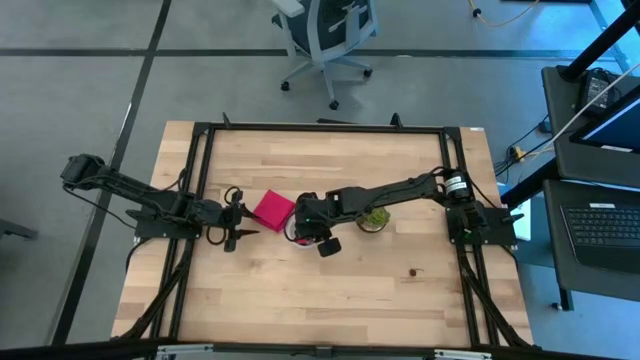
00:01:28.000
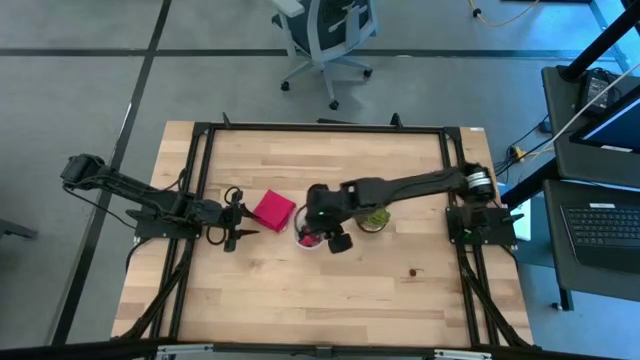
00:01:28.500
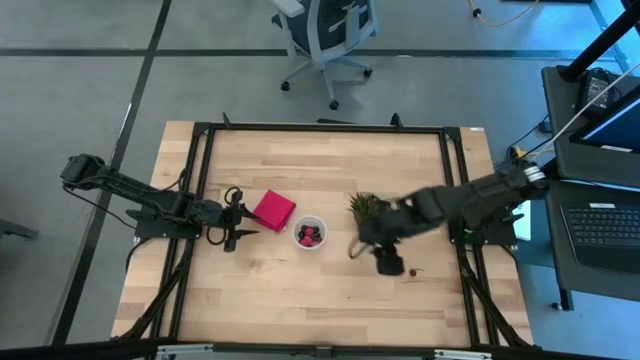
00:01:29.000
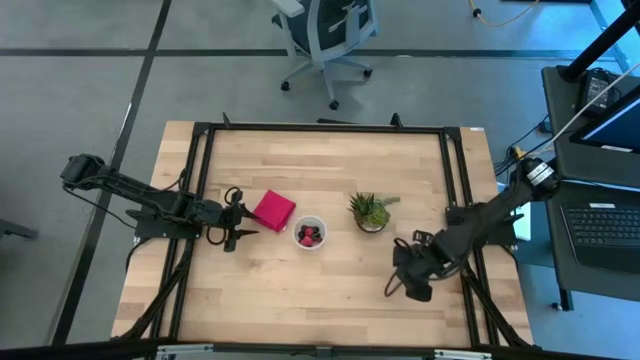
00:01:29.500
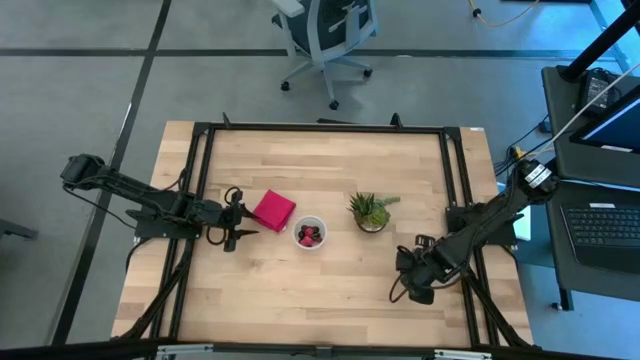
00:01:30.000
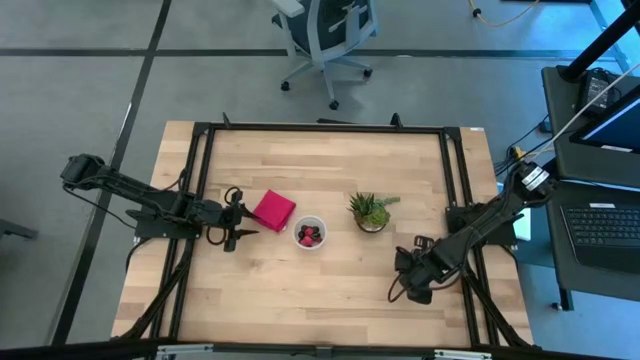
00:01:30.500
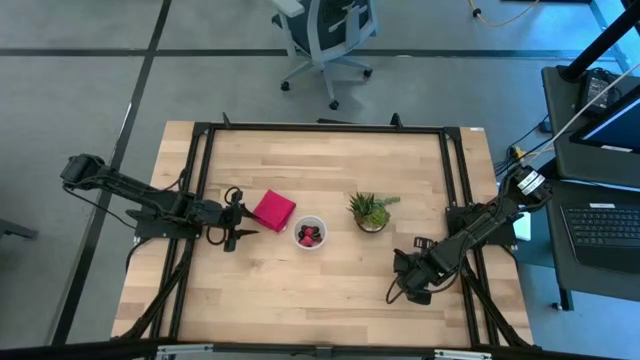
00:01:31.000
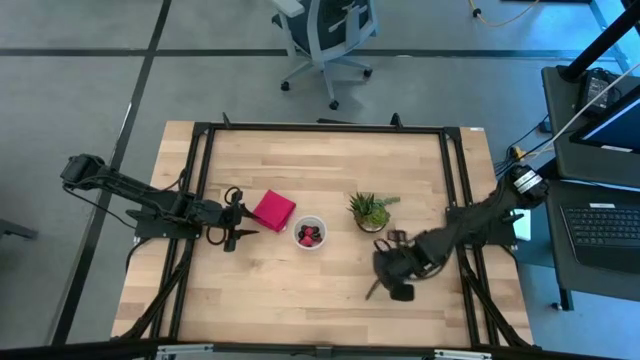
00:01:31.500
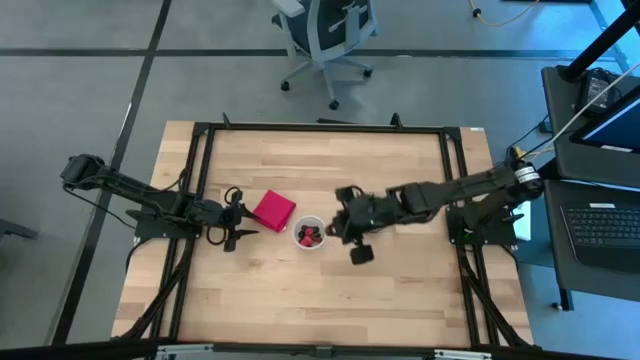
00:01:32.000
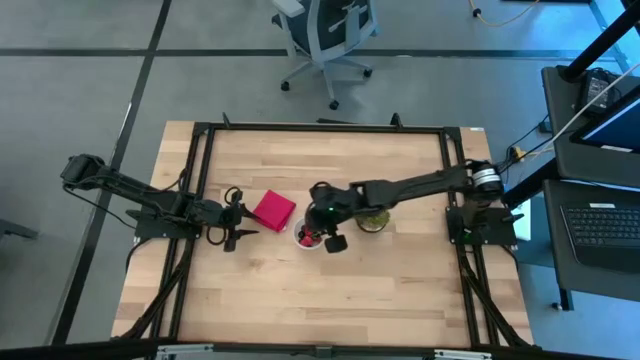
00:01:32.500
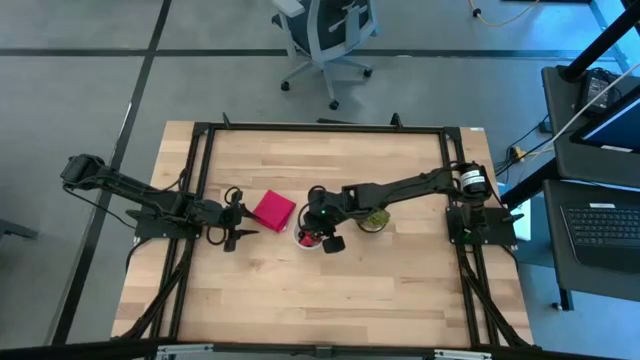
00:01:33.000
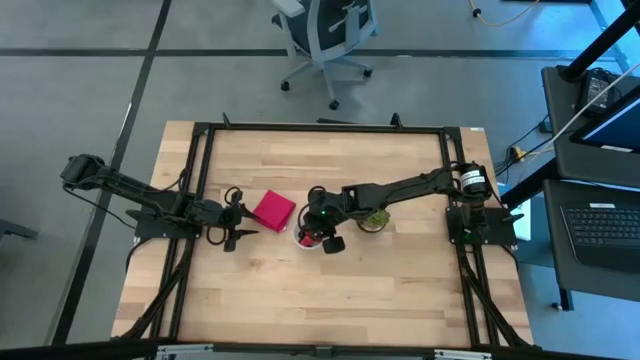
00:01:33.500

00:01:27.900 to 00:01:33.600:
Task: Pick and placing Produce into tupperware
Put the red cherry into the container

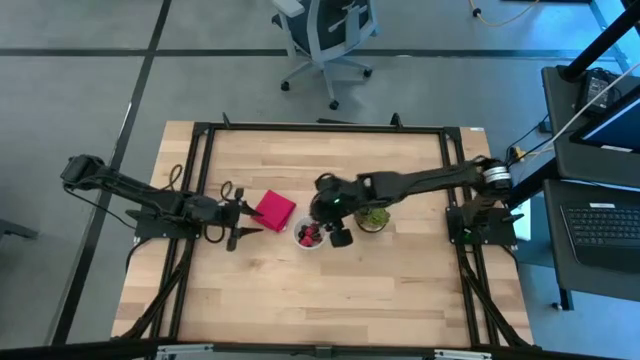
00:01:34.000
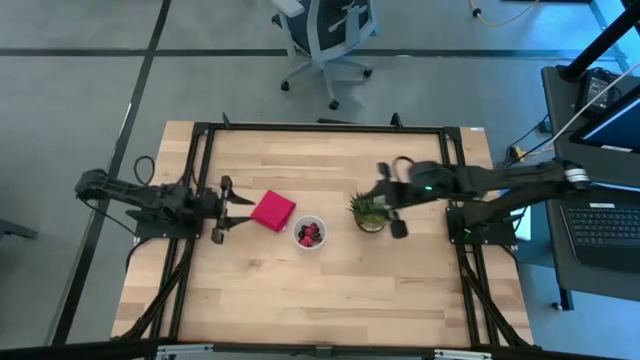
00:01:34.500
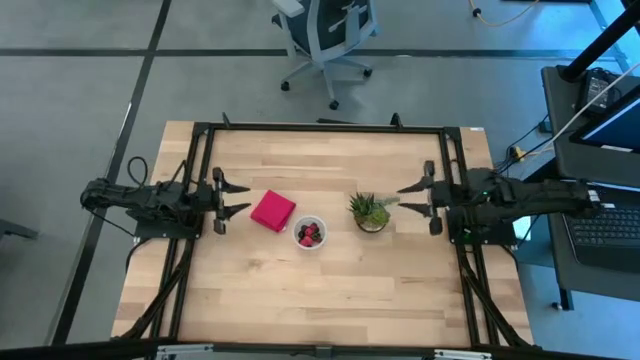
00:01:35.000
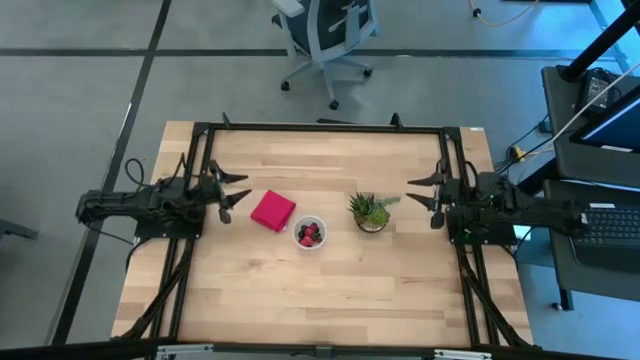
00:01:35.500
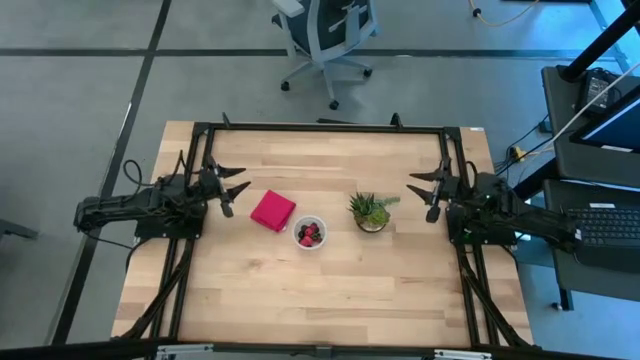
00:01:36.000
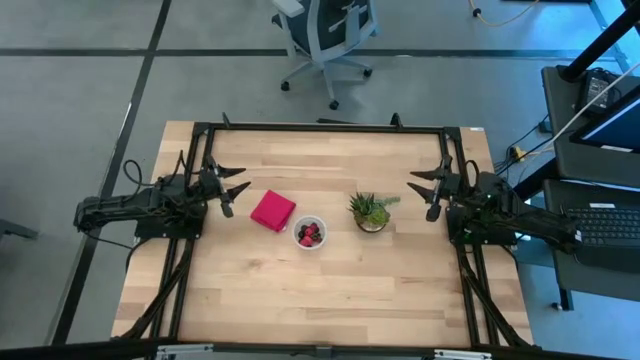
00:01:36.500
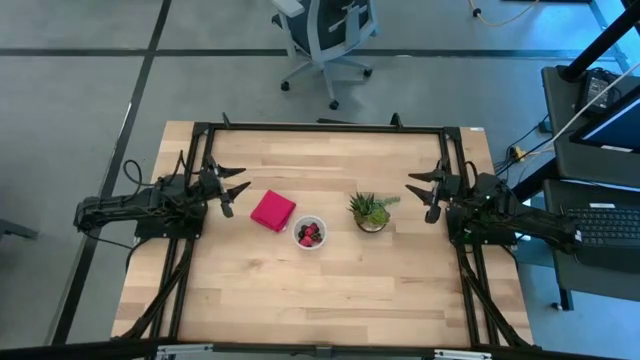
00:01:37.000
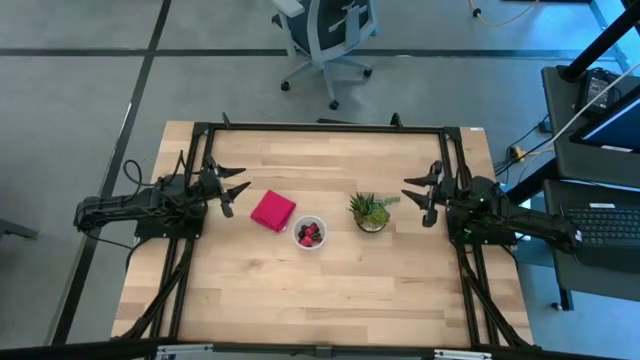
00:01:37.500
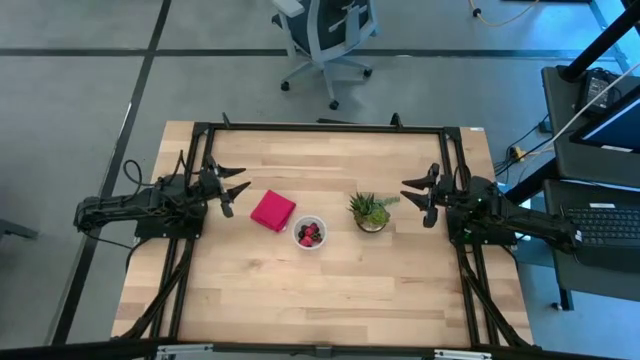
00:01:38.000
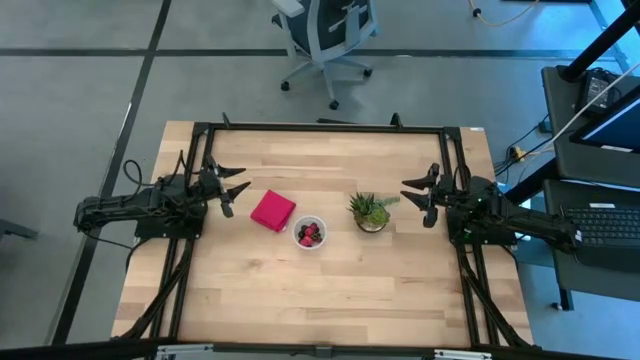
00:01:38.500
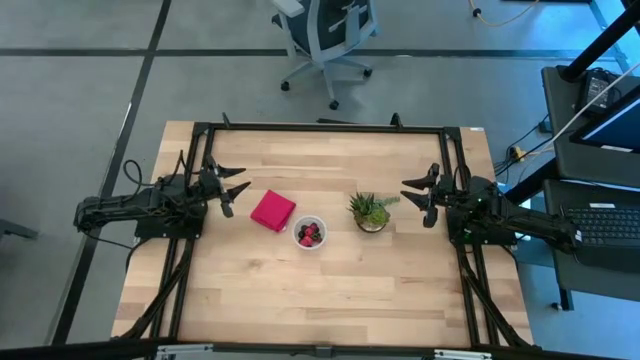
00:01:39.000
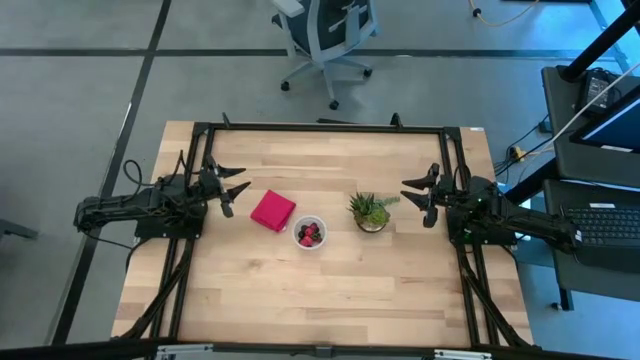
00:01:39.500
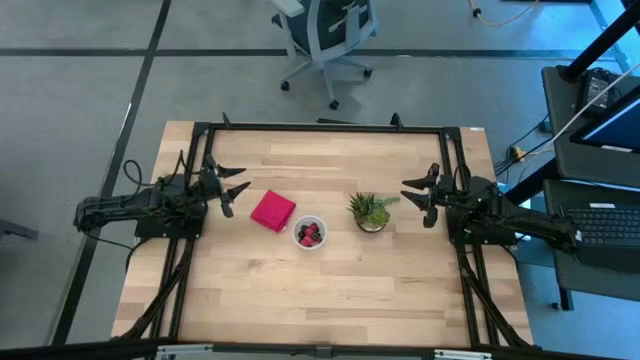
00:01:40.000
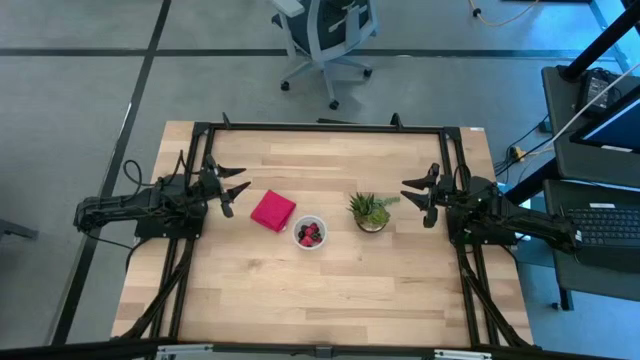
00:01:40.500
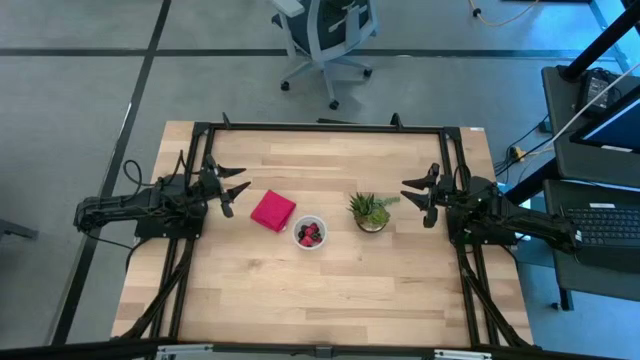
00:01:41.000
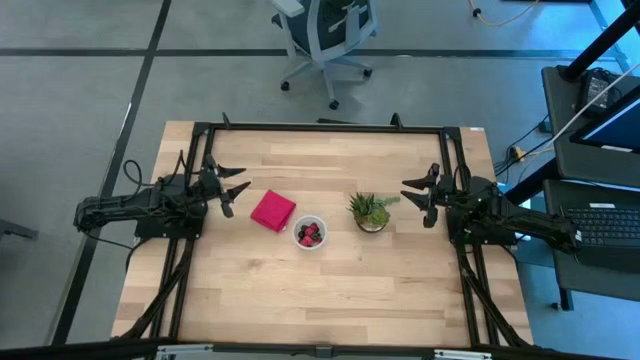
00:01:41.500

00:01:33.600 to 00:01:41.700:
Return to Home Position

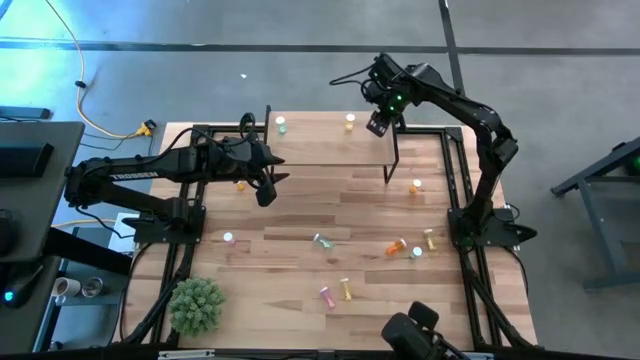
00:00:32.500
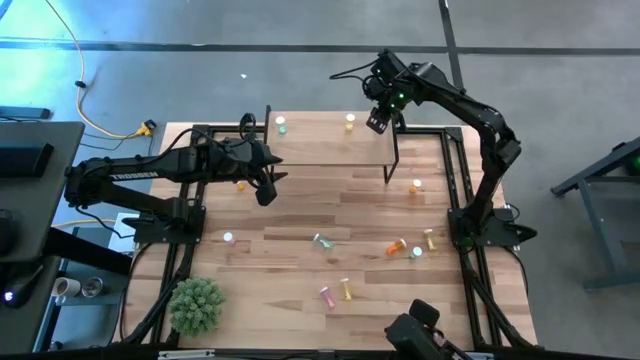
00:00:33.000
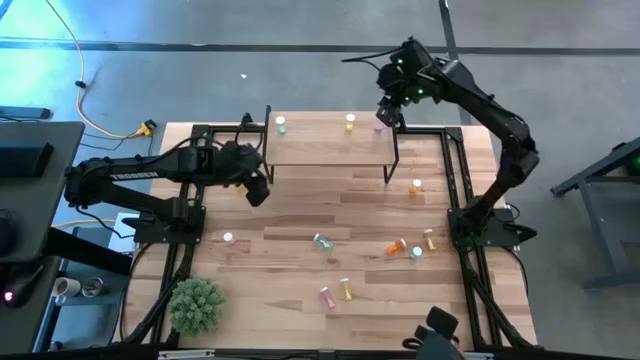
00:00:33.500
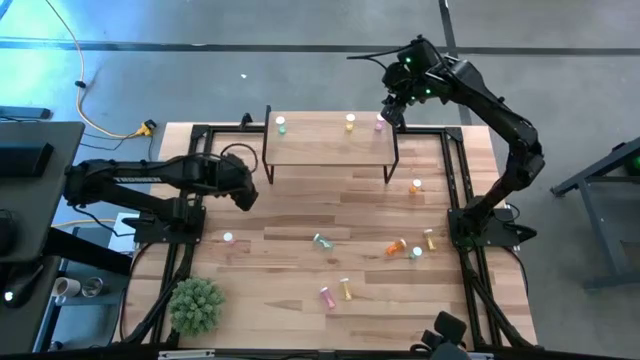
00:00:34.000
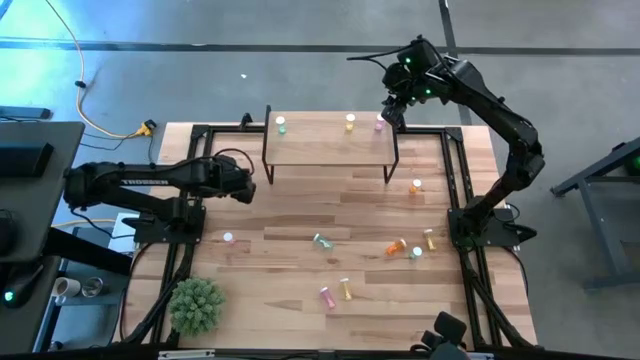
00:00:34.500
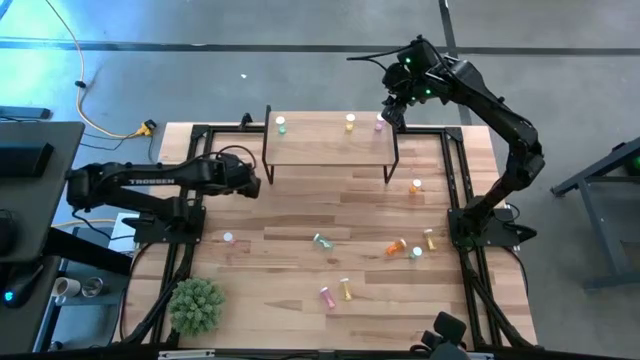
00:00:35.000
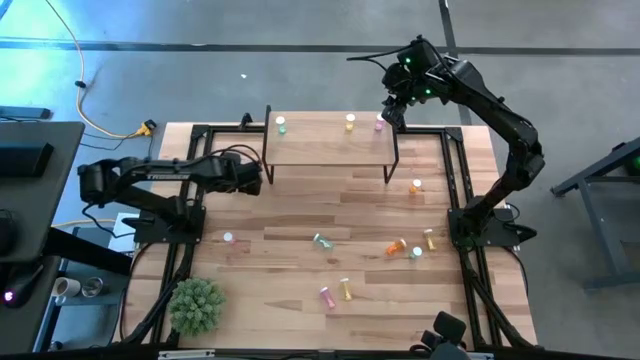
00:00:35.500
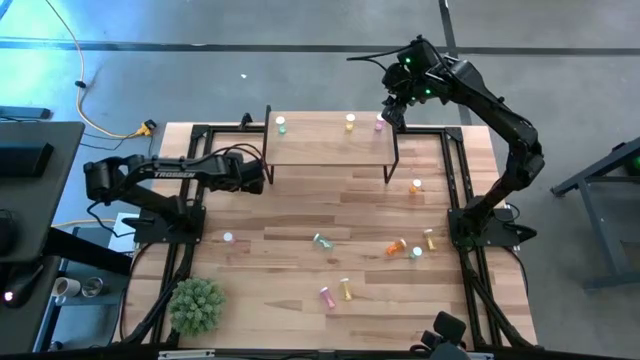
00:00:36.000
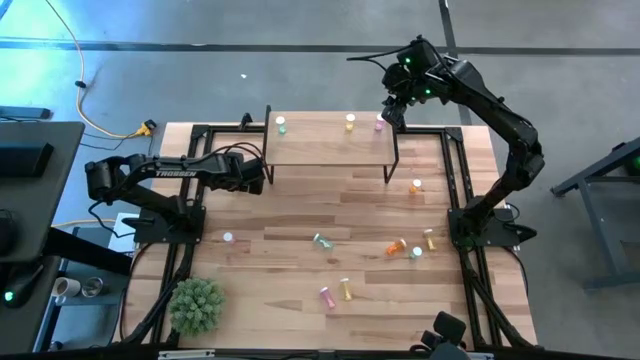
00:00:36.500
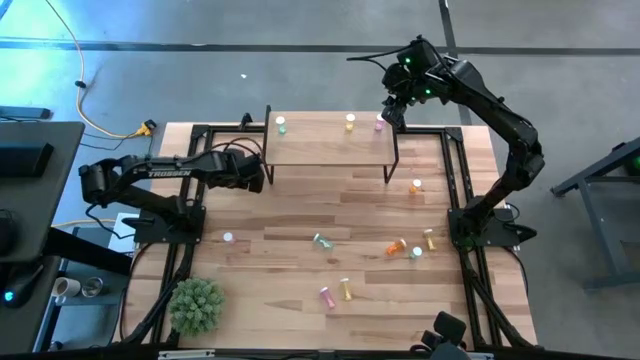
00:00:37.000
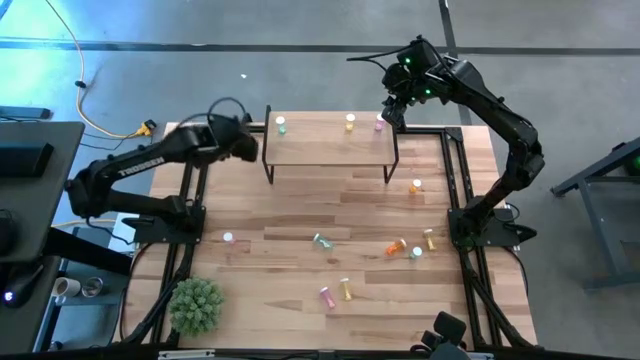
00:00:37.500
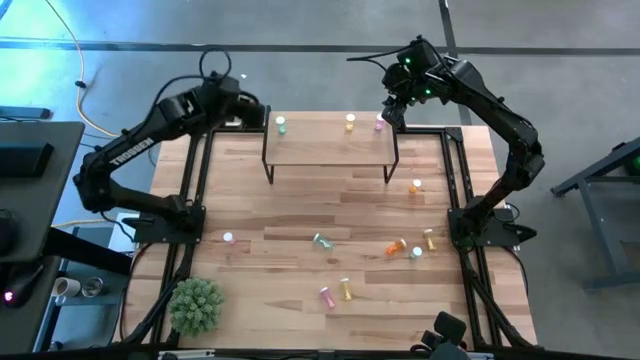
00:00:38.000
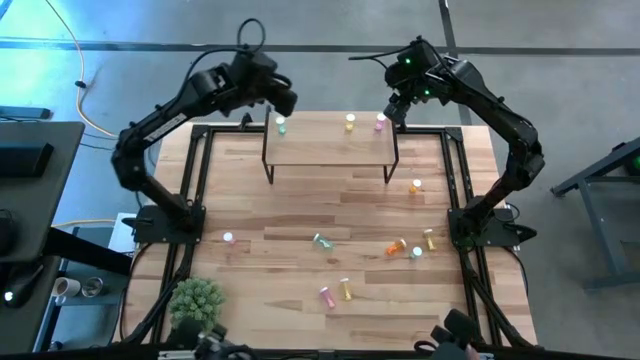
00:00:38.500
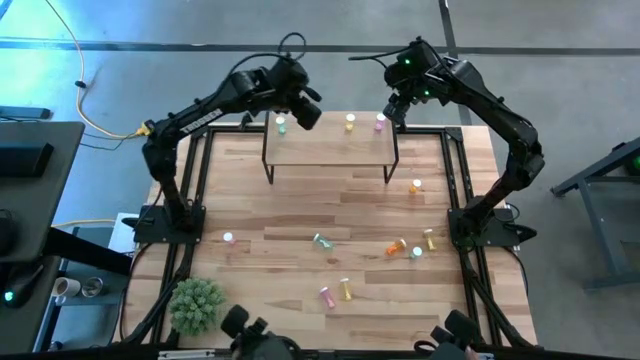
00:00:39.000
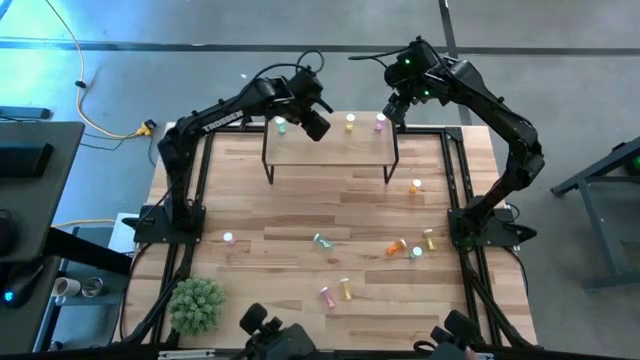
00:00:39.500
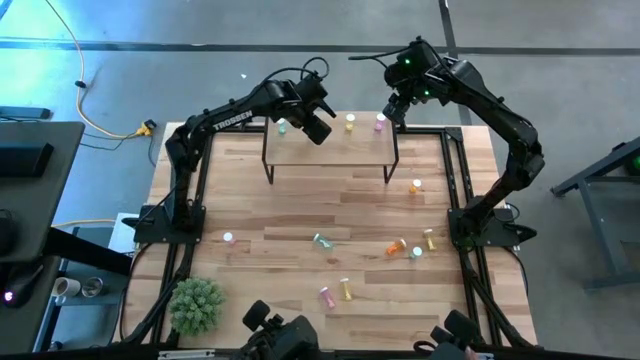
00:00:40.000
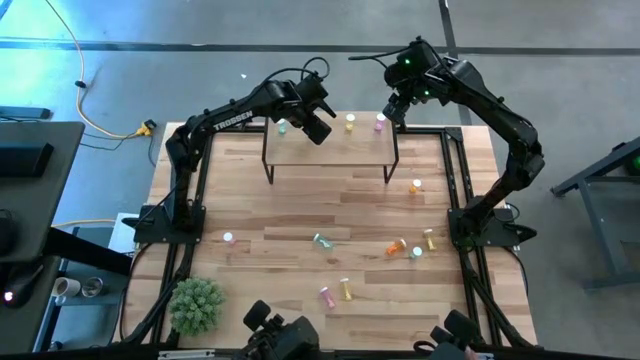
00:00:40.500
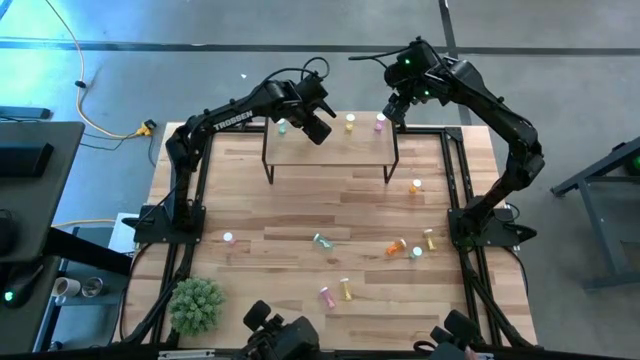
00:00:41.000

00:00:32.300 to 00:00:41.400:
Task: Pick and place medicine bottles onto shelf by color
Put the top left orange pill bottle on the shelf
